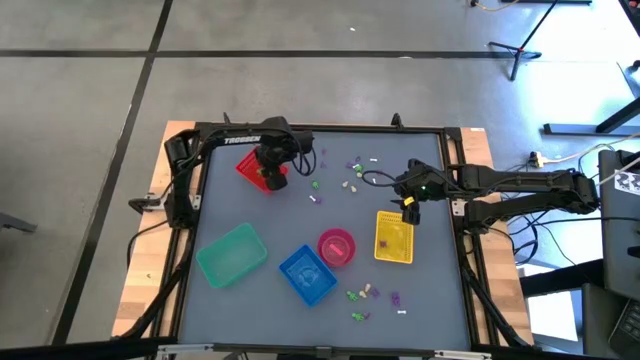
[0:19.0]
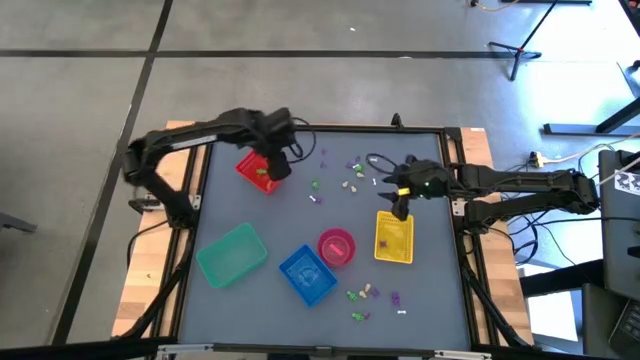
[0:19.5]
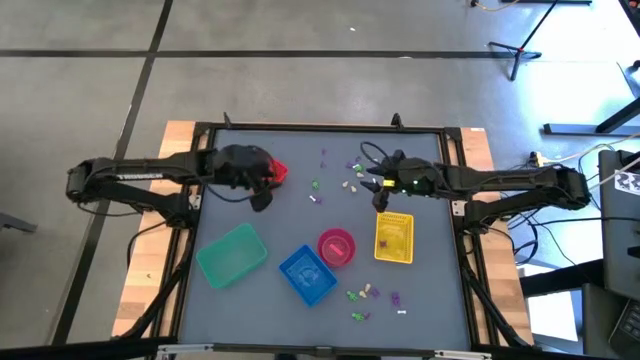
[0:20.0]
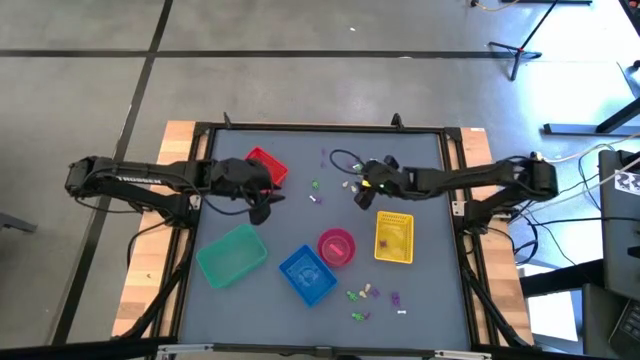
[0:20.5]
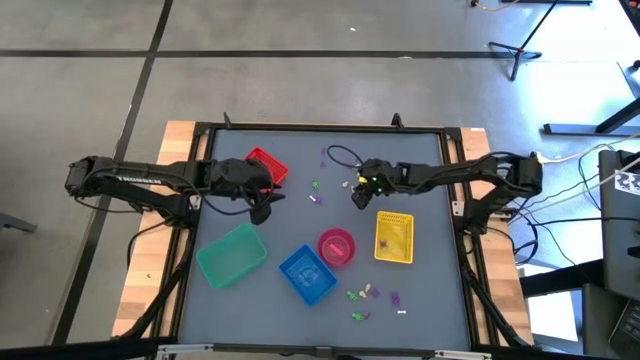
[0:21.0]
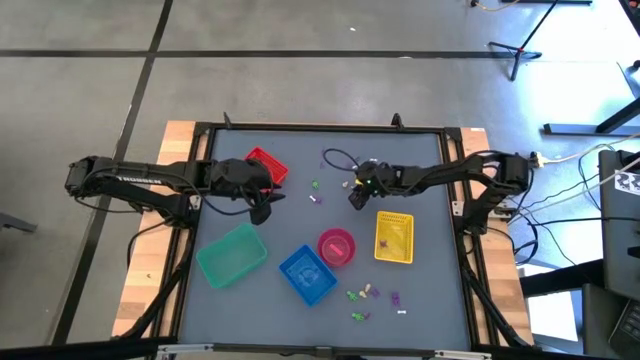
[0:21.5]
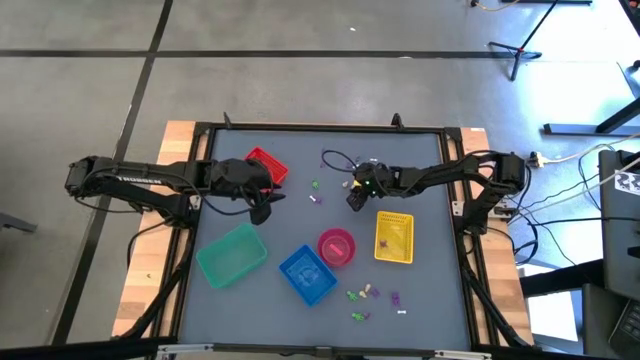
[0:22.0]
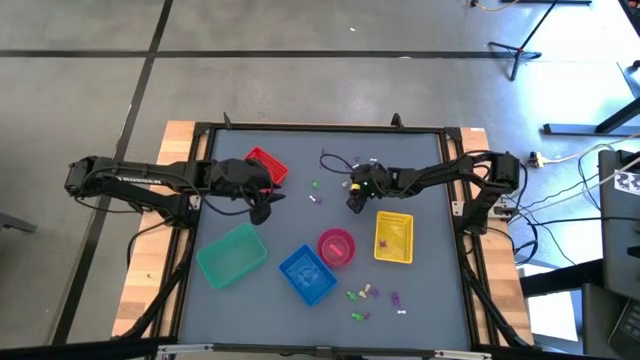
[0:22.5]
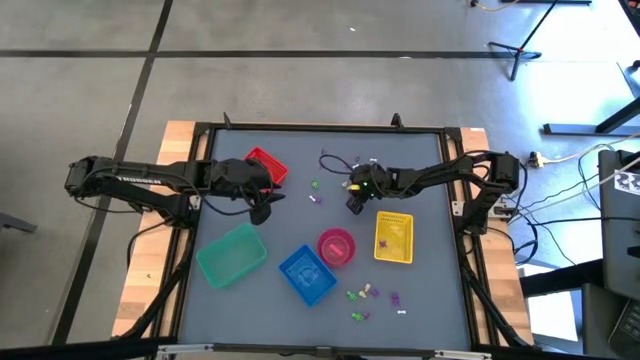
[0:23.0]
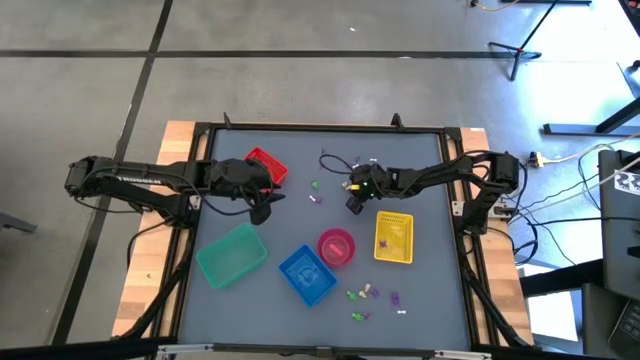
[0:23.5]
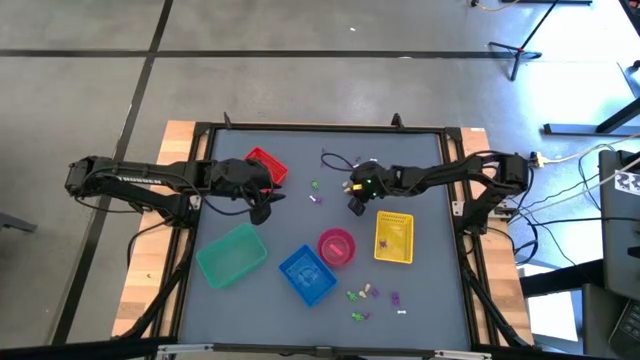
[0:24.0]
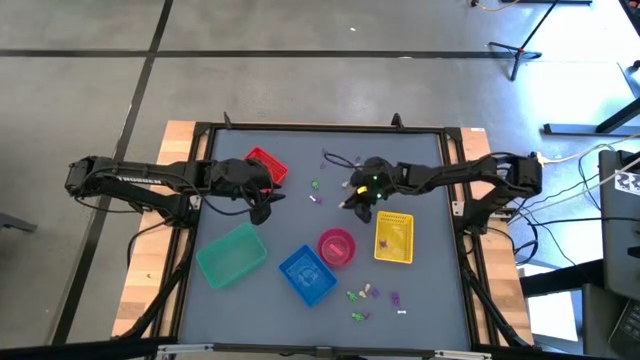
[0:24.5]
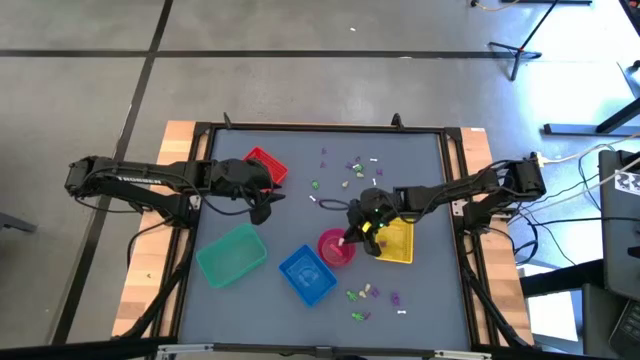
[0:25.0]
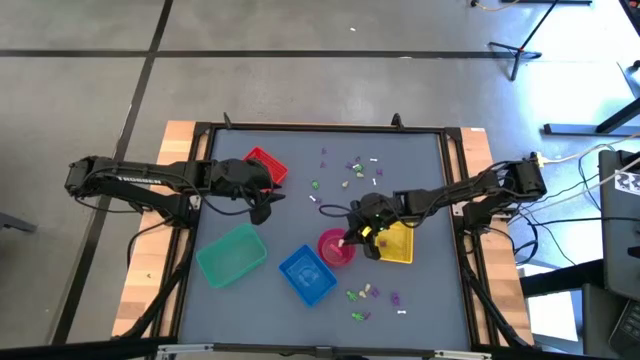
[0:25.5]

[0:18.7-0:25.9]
Task: Sort Halloween decoration
Put the white skull toy into the pink bin

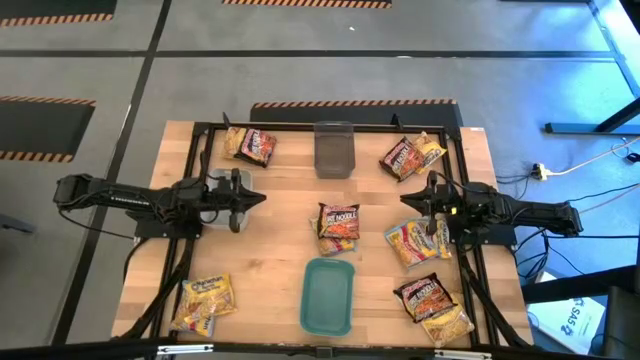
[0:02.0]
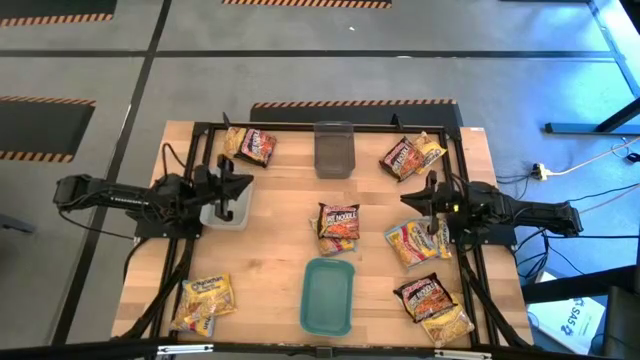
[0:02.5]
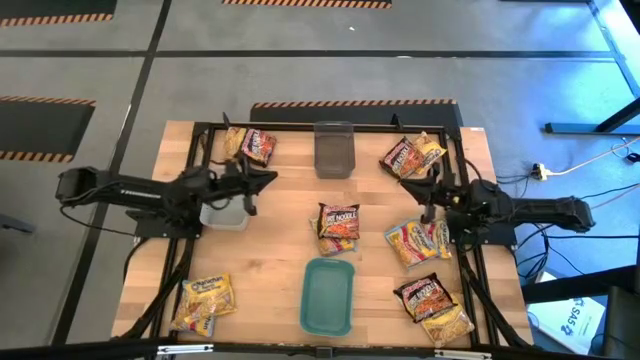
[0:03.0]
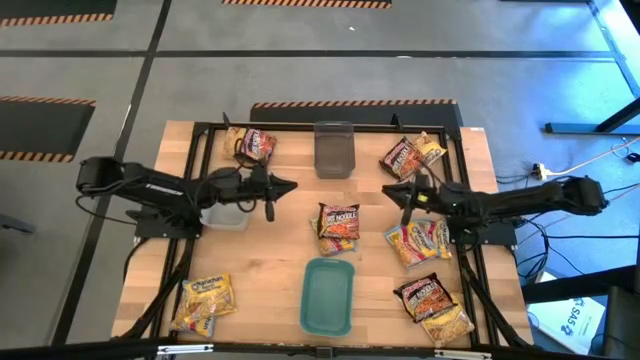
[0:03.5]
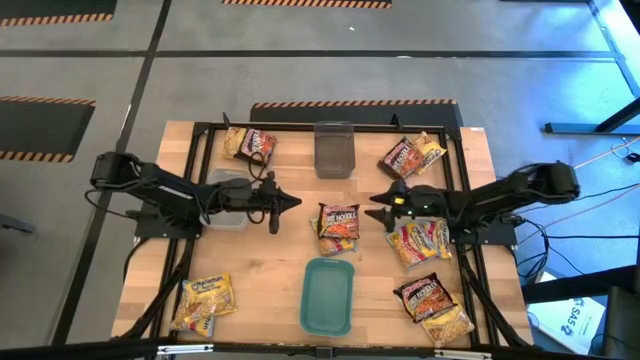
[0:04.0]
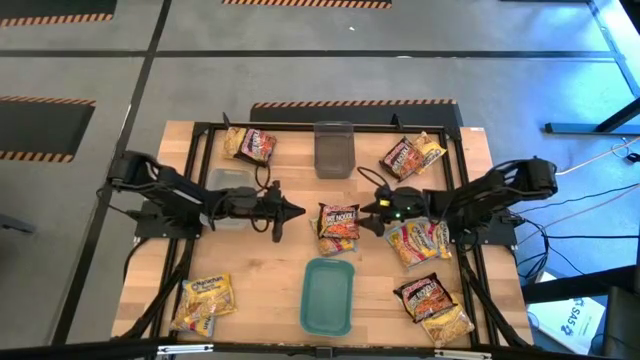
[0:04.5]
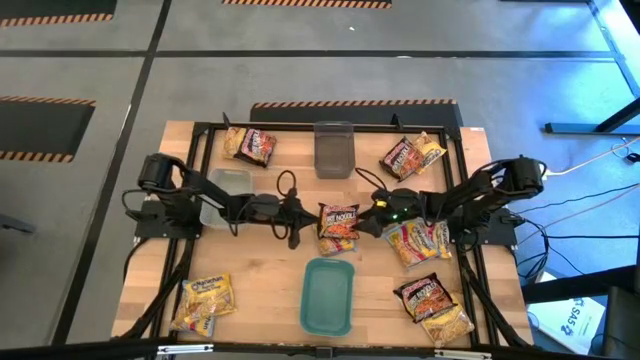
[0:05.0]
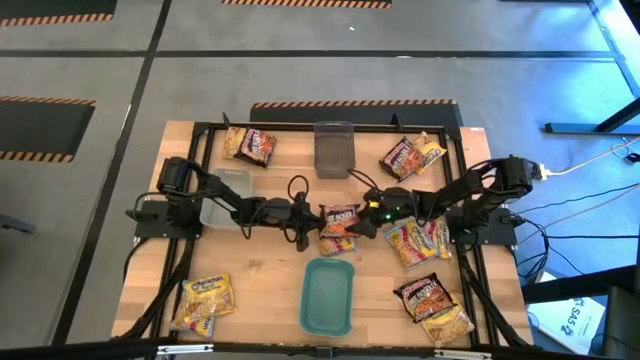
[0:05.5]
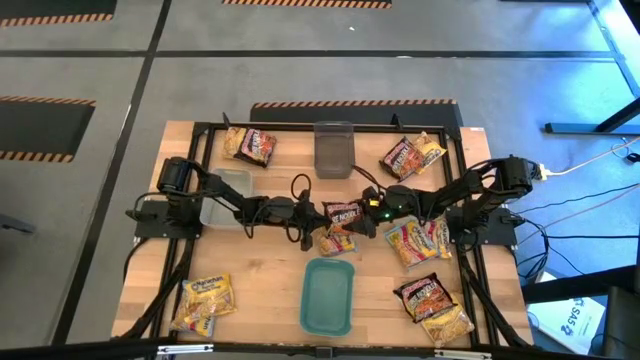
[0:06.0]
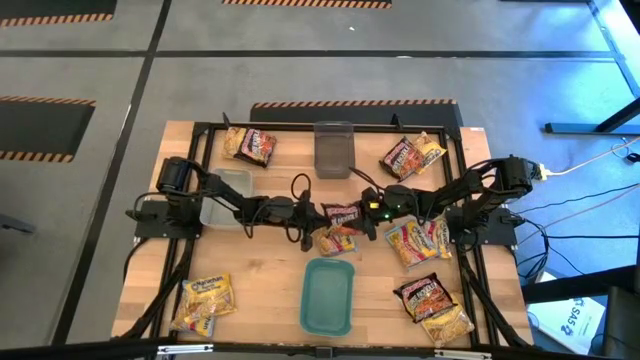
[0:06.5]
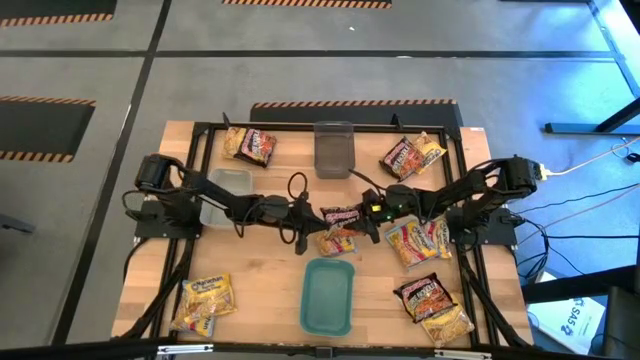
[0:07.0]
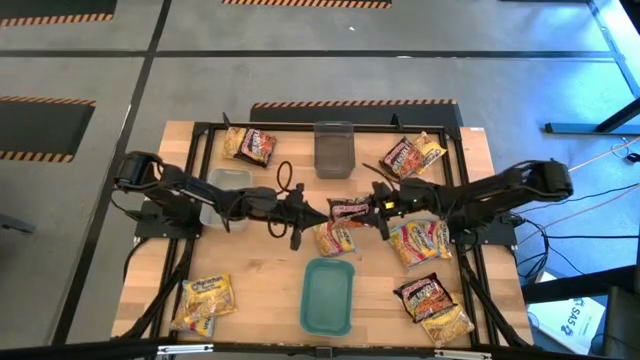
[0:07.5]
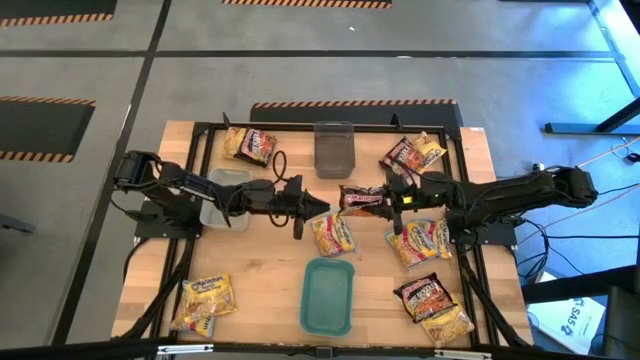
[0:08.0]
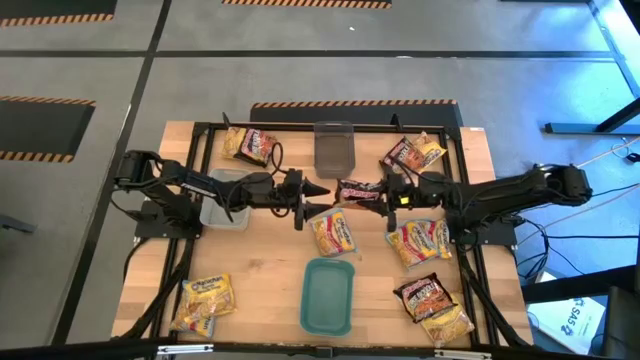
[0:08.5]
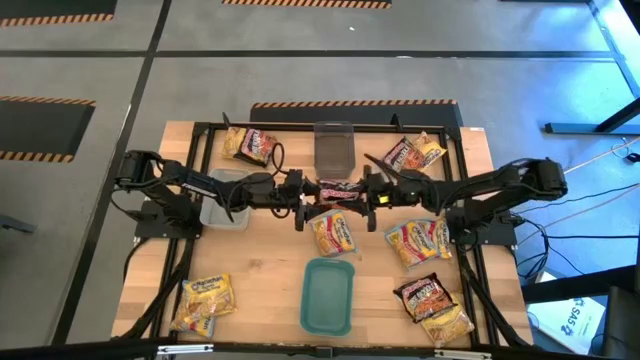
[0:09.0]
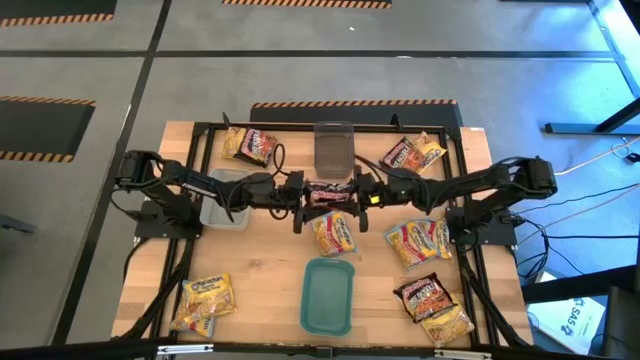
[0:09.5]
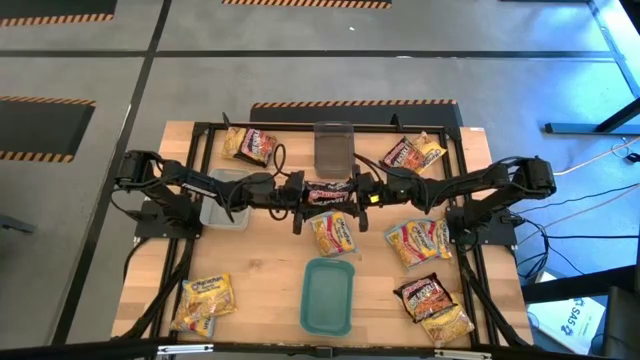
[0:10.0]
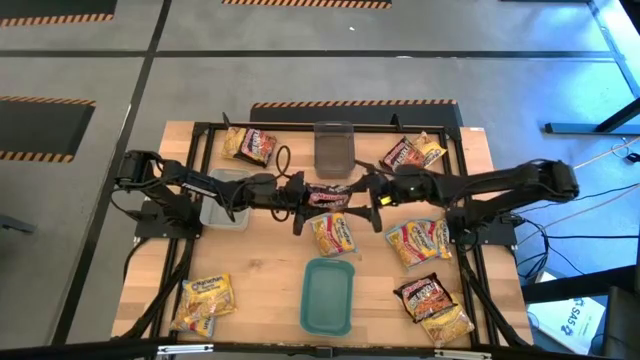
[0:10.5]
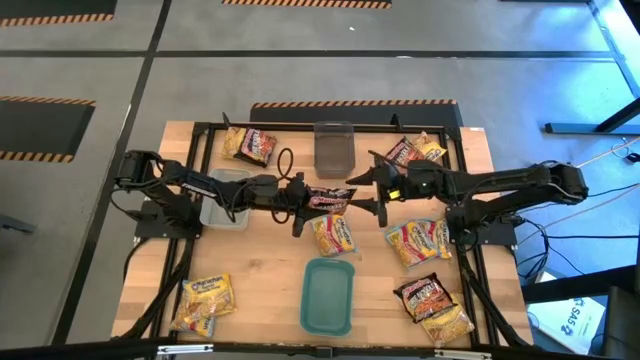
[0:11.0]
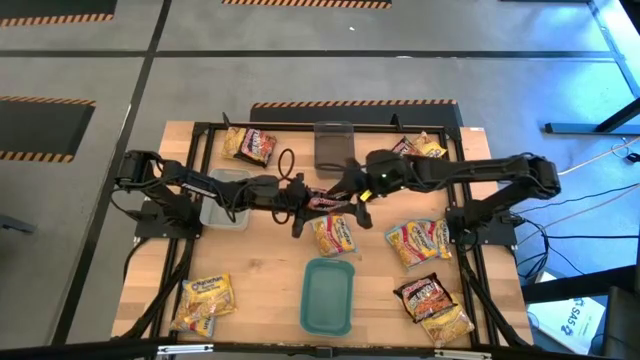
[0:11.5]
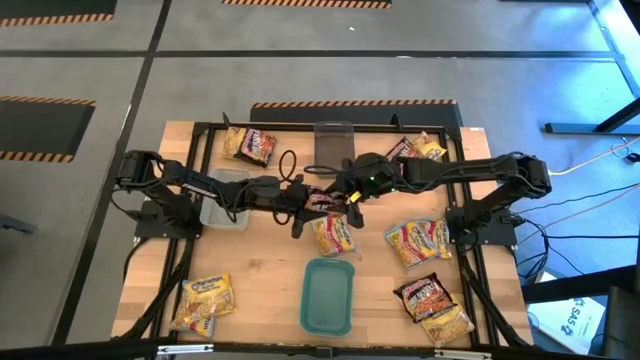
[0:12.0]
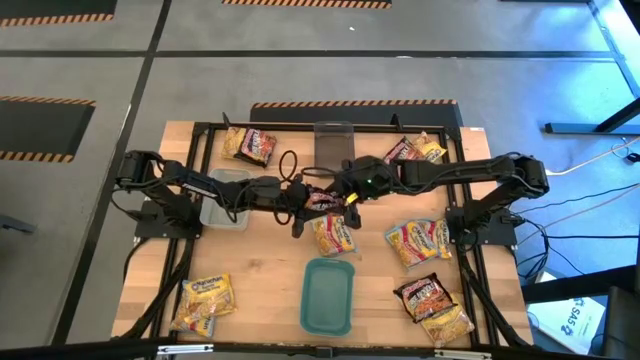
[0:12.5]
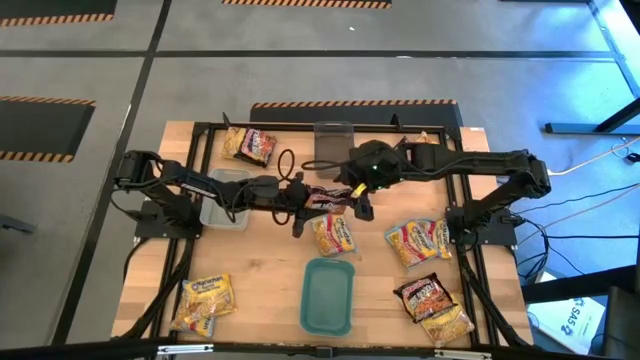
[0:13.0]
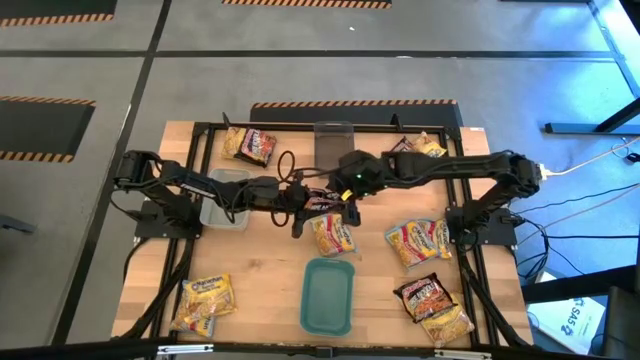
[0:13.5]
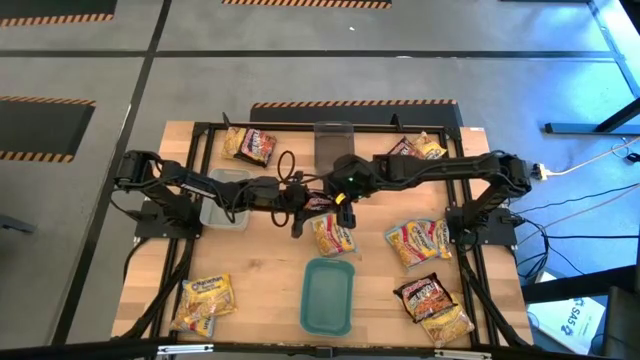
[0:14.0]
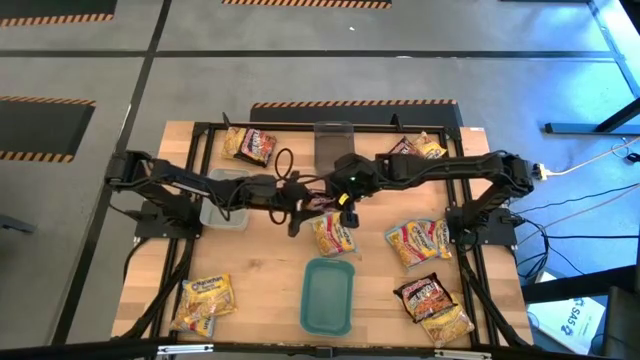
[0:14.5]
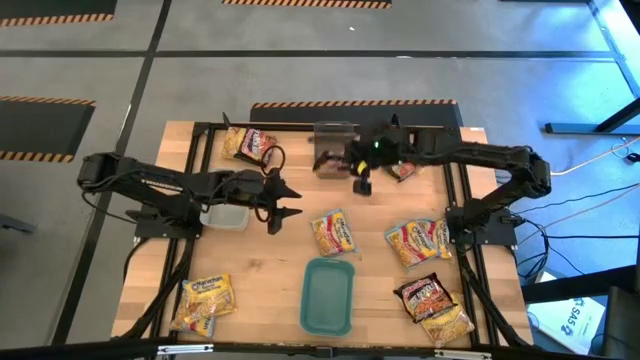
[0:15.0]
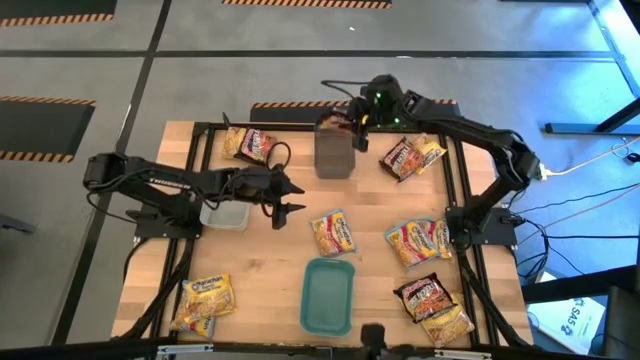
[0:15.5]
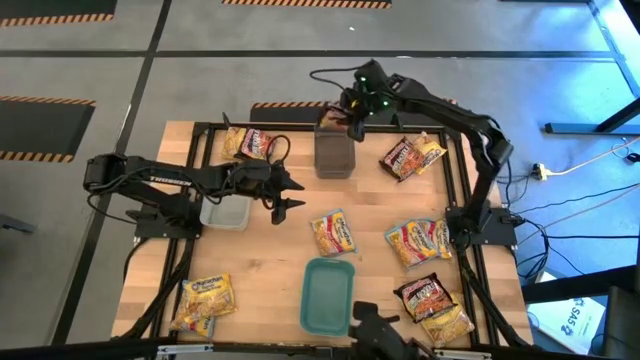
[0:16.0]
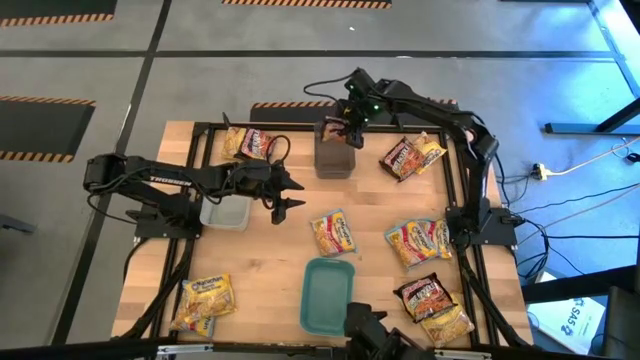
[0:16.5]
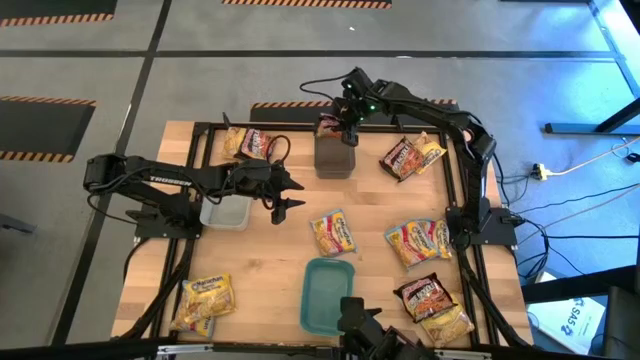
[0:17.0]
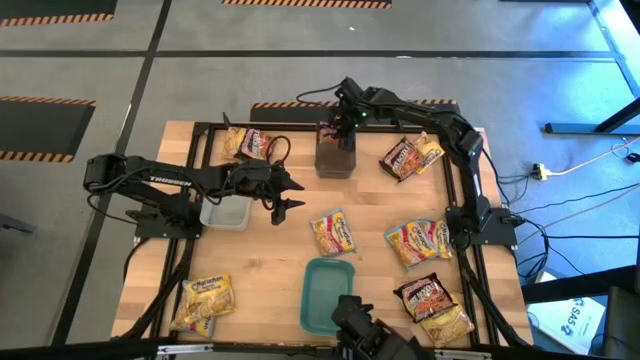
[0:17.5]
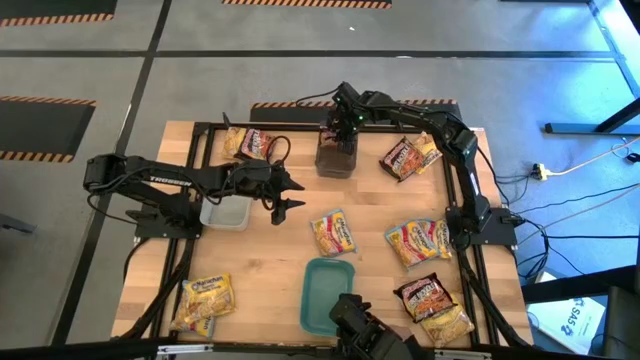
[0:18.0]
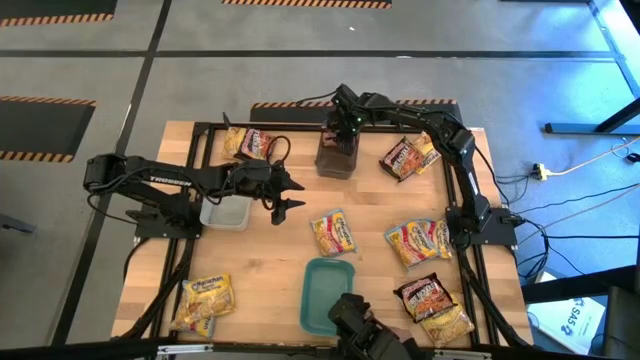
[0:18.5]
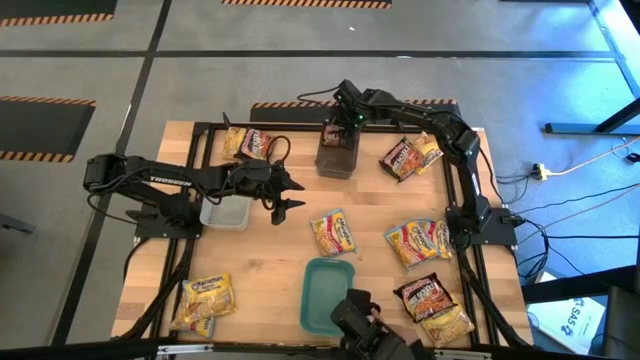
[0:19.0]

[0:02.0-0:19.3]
Task: Sort Maruchan noodles
Put the black noodle pack into the black bin
